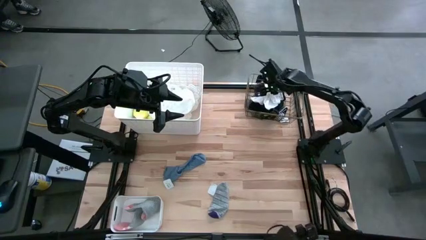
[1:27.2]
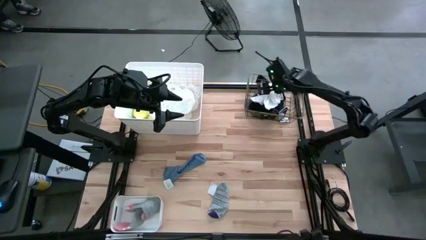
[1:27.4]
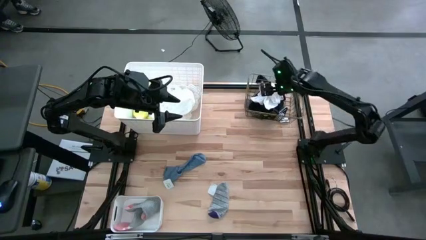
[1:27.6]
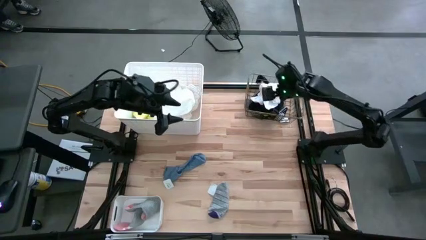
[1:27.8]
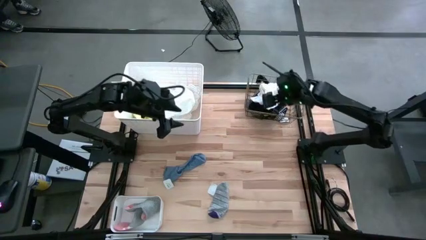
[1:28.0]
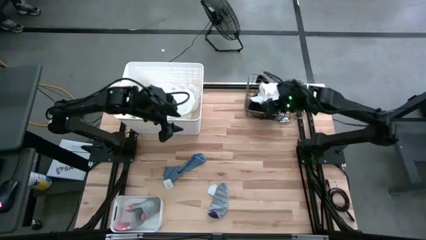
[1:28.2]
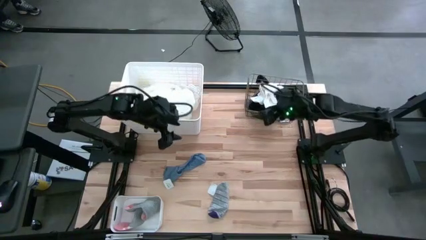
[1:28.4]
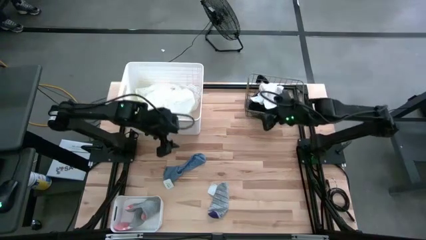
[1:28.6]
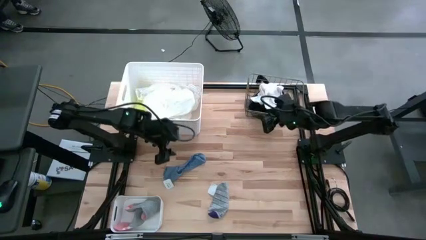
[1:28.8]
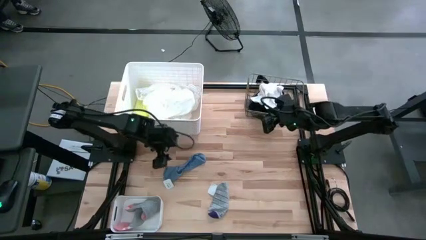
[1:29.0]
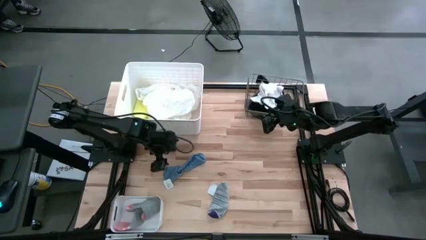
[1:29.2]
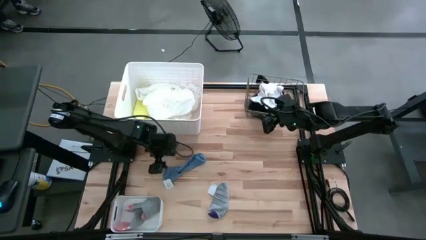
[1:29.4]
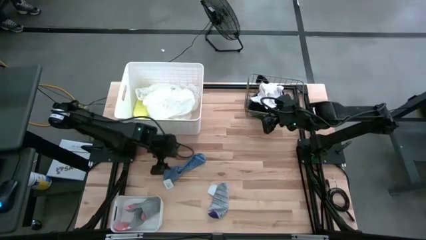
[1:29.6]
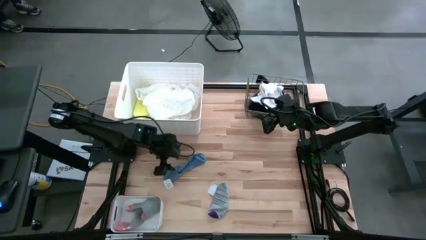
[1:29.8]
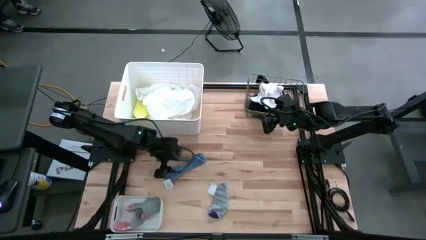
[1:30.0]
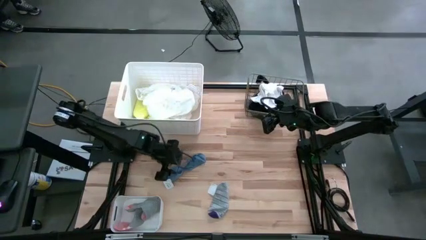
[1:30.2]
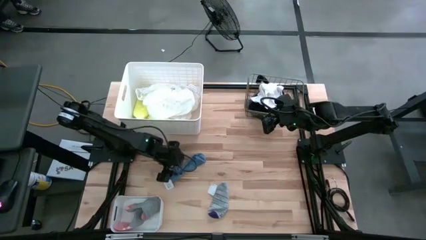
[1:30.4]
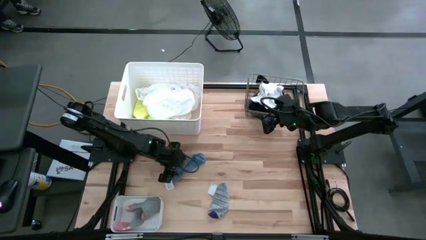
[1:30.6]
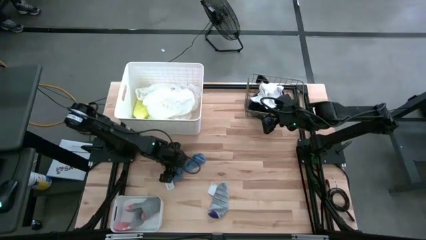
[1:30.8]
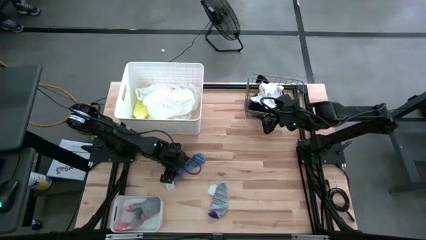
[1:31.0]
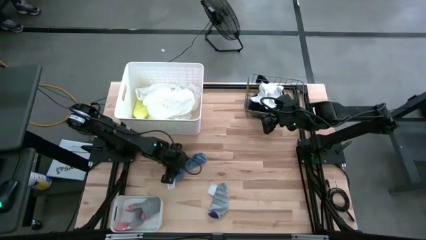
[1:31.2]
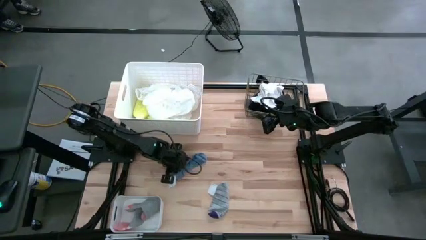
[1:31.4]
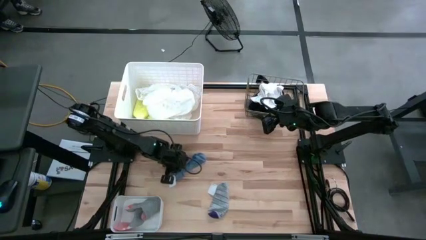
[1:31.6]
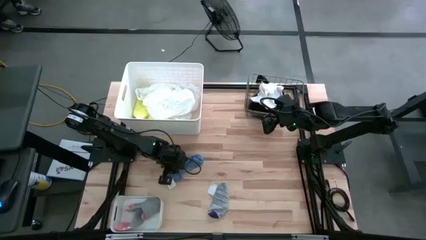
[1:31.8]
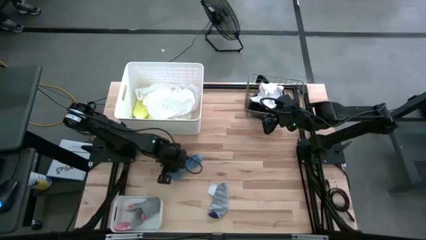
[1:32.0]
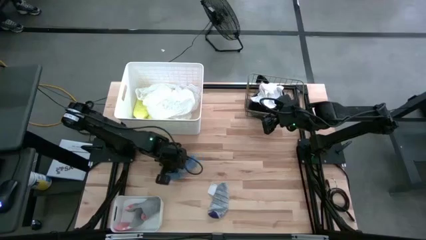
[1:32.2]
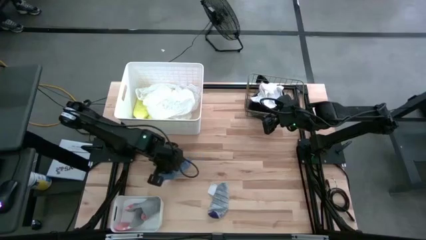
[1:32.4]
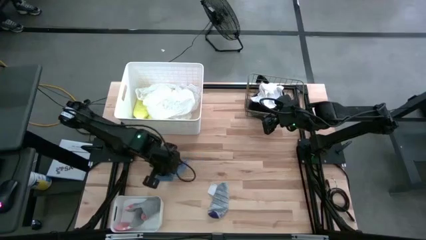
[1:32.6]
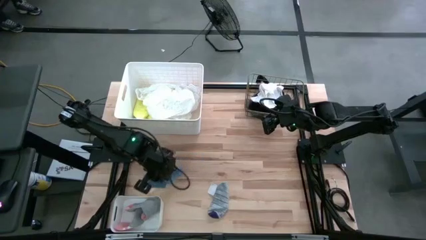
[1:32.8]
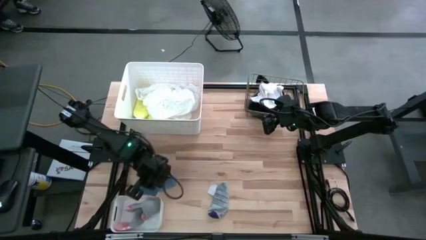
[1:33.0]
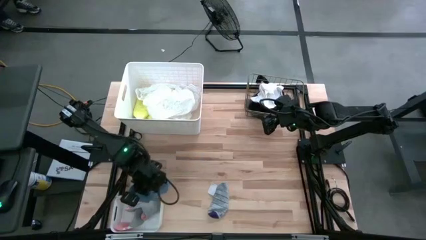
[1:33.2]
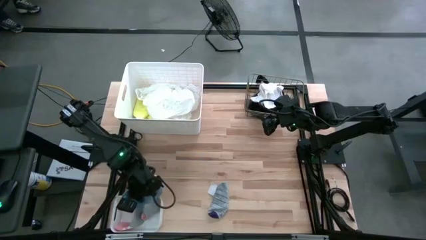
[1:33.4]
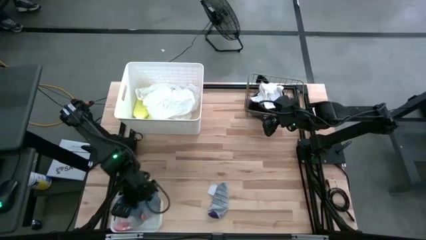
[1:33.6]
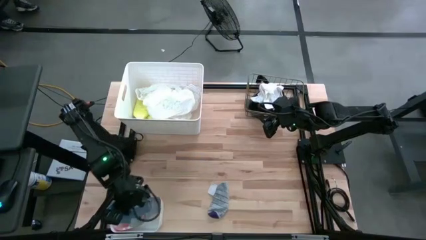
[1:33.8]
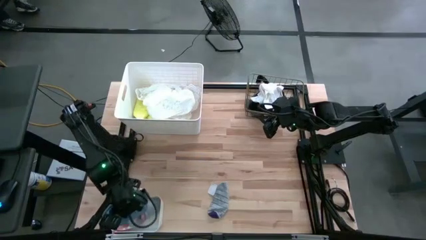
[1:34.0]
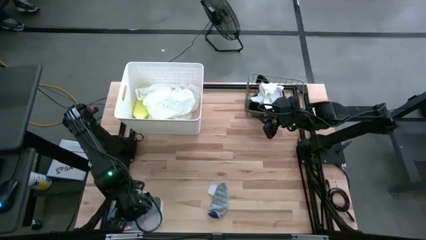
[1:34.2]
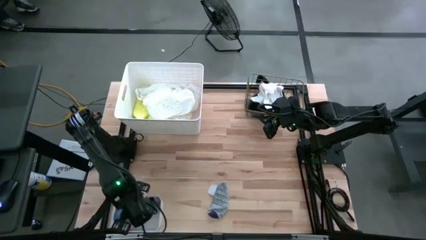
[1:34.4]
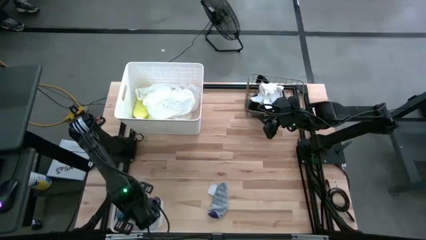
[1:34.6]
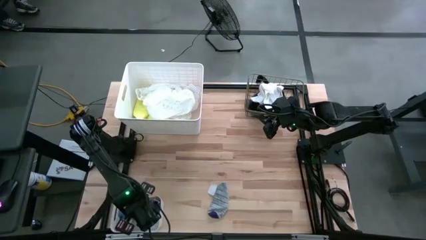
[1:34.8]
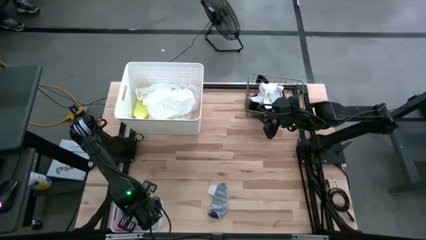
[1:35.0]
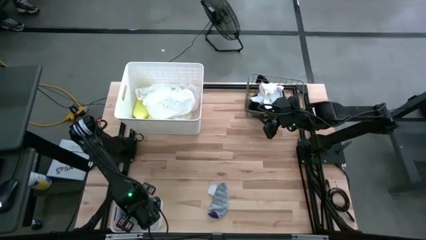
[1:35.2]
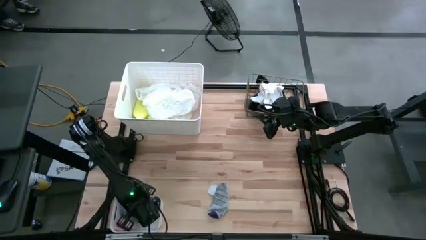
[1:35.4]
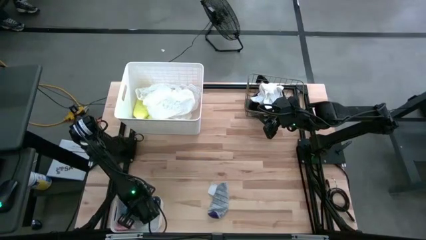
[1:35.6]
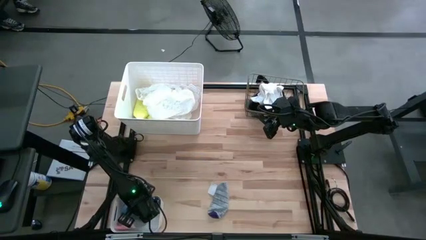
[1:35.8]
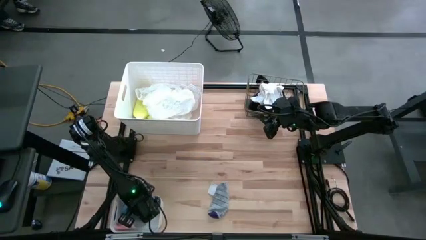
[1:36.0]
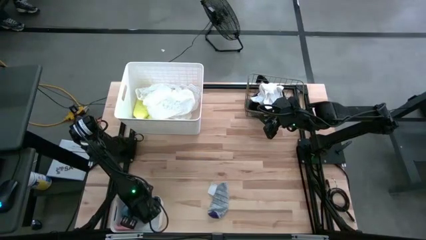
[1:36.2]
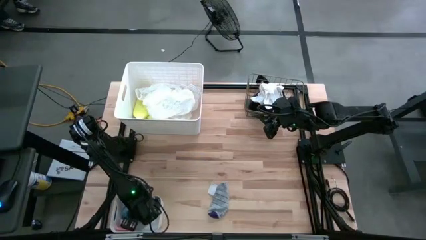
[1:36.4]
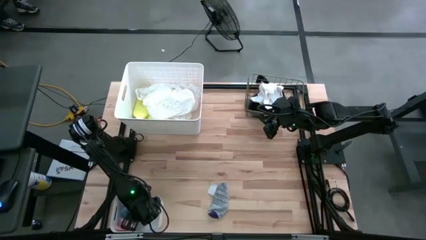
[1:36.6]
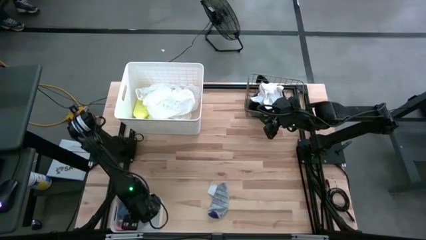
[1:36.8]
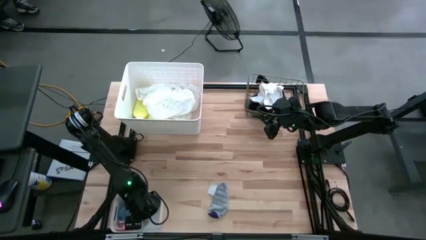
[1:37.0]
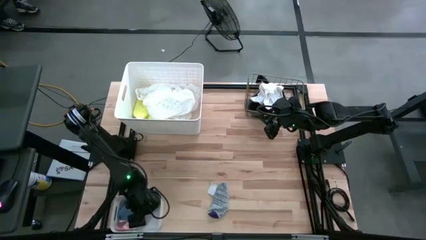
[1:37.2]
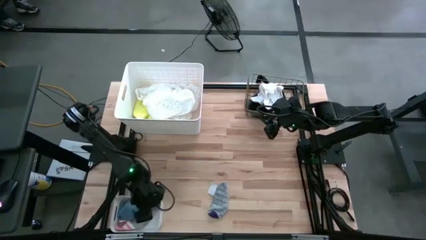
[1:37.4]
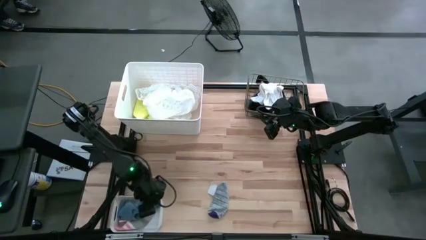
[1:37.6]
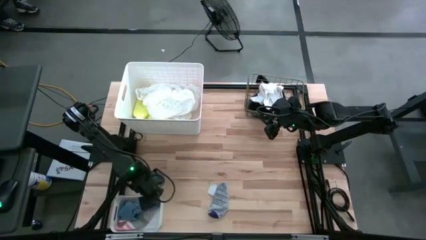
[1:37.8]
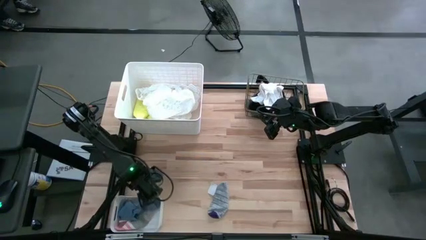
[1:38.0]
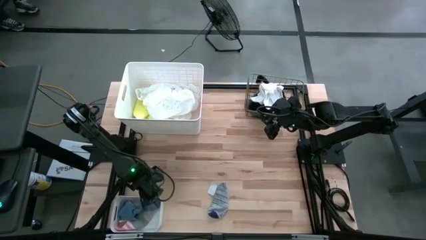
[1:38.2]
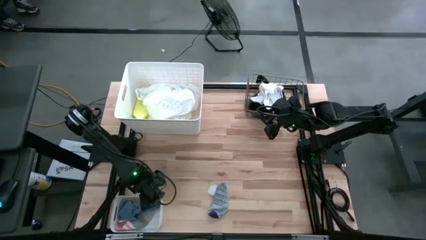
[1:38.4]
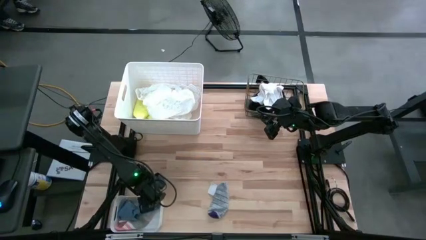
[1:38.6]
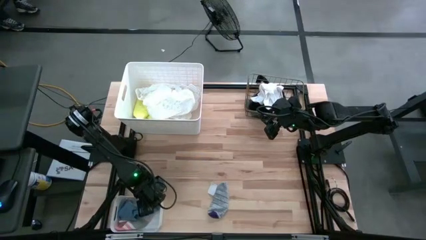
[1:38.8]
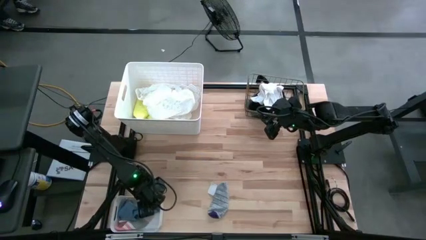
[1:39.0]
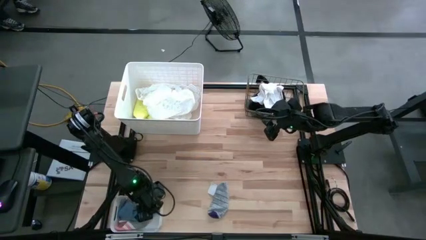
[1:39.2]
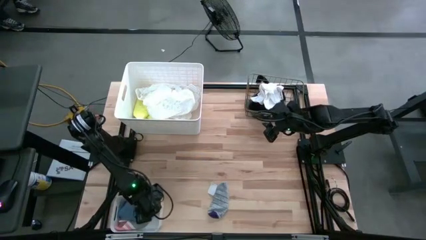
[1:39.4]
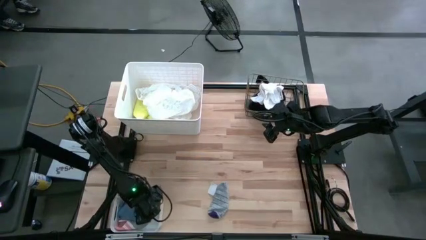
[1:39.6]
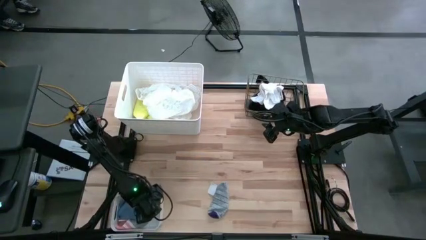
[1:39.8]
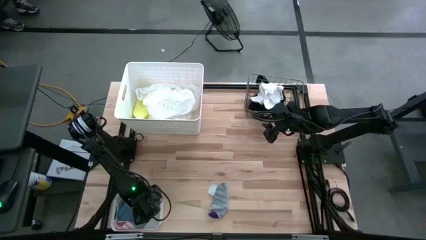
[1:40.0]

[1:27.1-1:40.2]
Task: Pick & Place Cloths
Put the blue sock into the bottom white bin

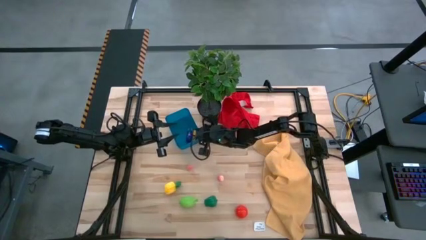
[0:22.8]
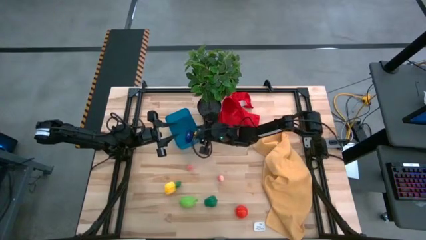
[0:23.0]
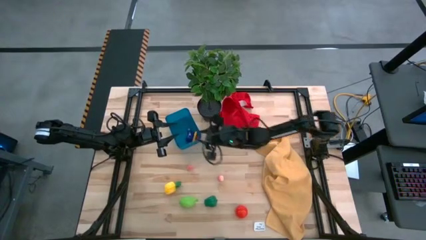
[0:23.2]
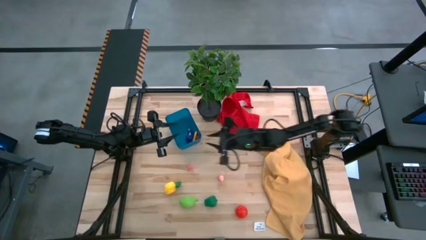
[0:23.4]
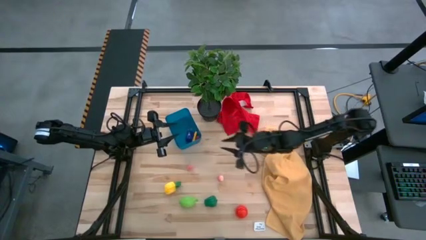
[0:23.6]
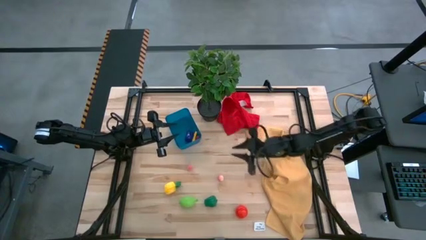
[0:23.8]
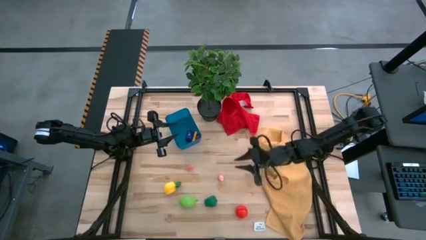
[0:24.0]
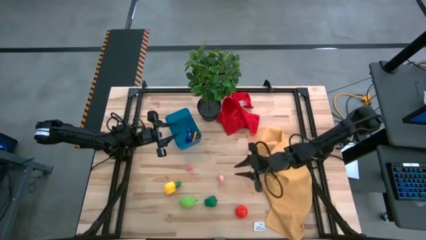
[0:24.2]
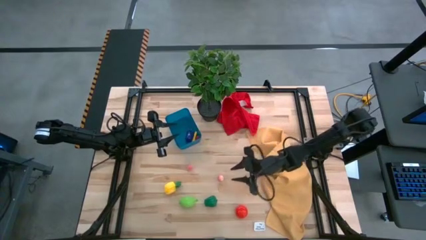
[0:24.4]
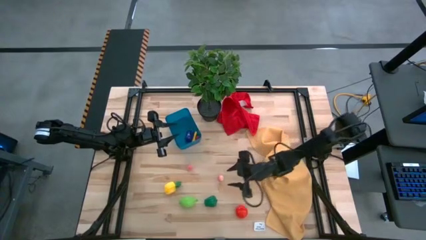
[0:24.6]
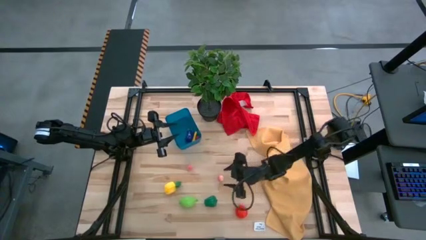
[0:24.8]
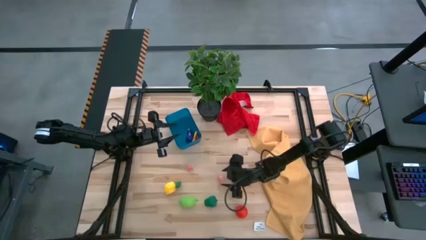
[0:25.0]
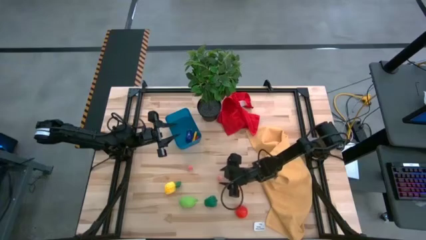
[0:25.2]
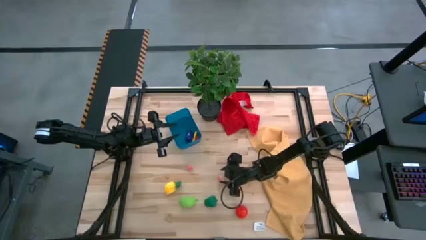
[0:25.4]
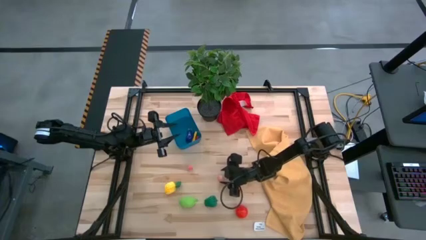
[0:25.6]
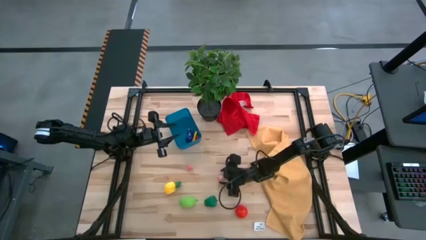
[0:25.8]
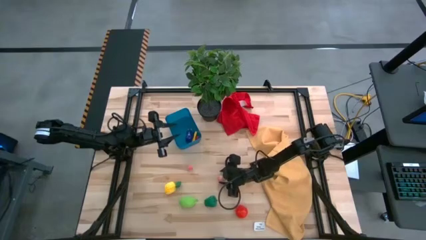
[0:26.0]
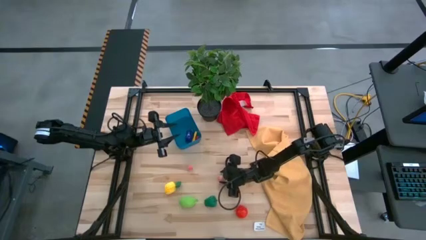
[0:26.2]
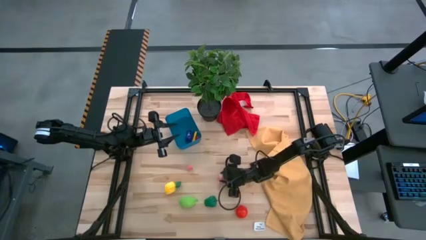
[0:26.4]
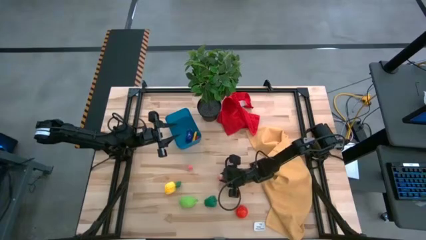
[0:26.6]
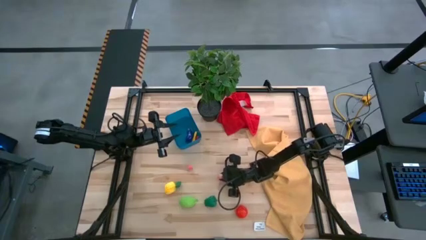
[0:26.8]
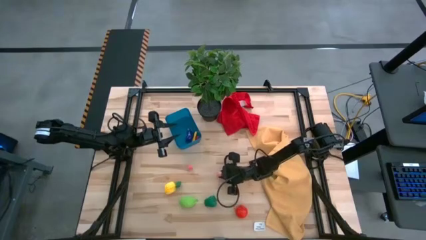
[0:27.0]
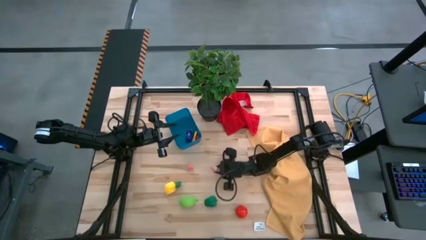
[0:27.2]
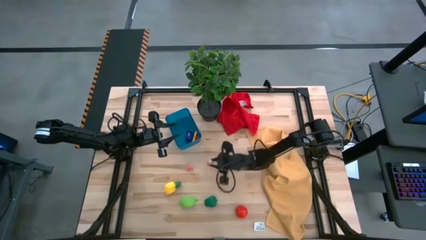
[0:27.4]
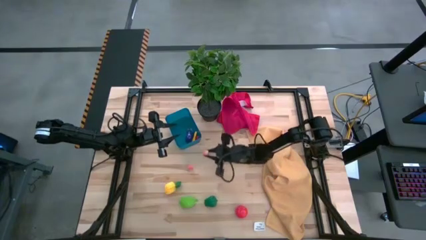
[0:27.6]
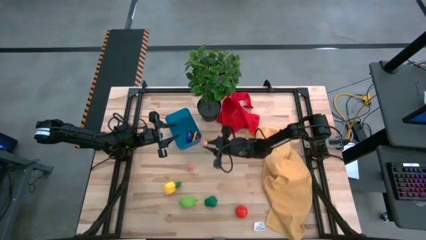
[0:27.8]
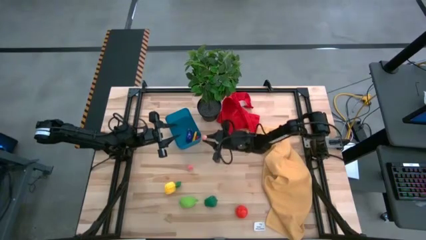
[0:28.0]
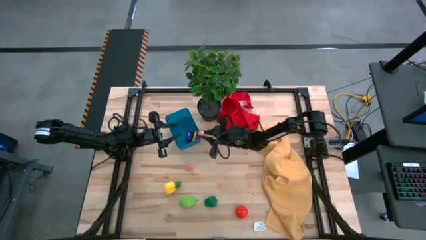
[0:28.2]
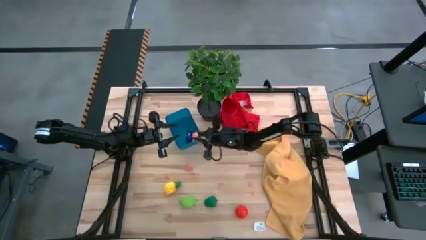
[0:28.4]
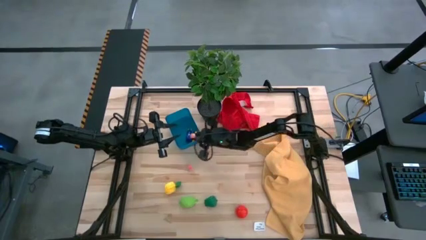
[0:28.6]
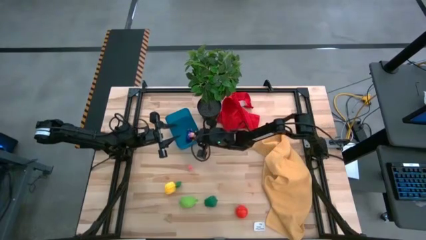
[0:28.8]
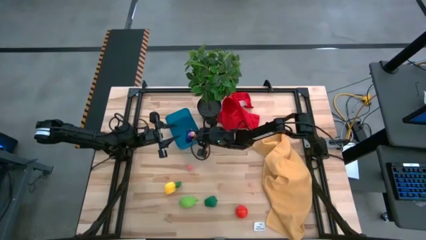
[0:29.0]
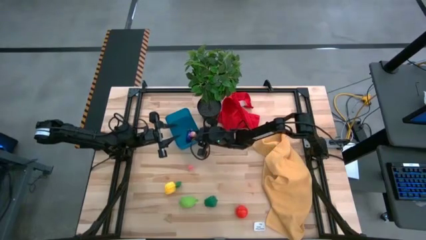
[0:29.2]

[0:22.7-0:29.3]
Task: Pick and placing Produce into tupperware
Put the right pink peach into the blue bin
